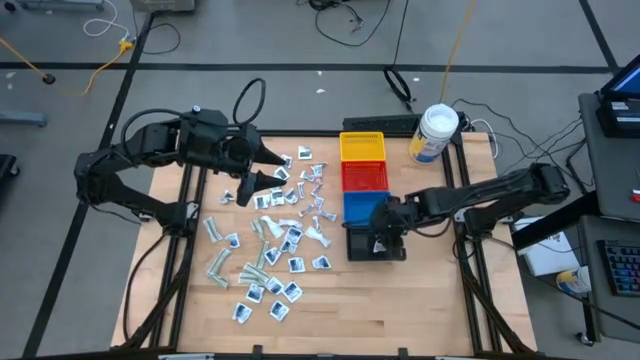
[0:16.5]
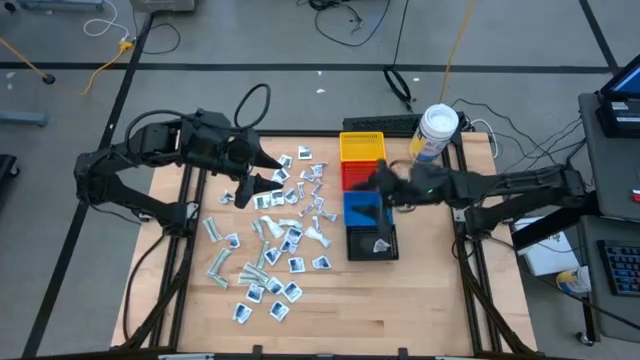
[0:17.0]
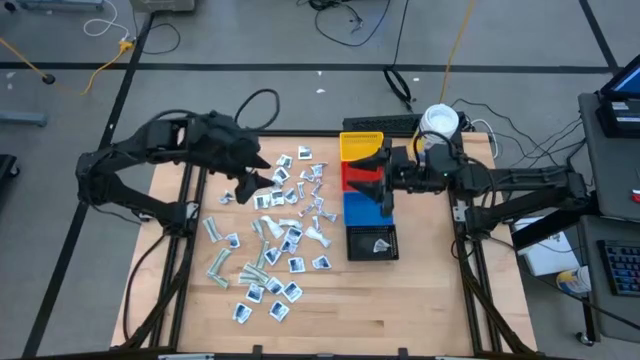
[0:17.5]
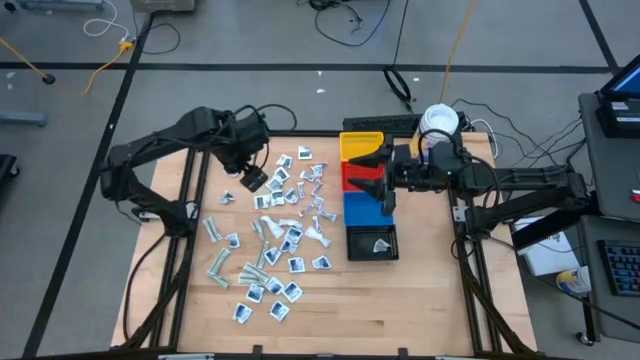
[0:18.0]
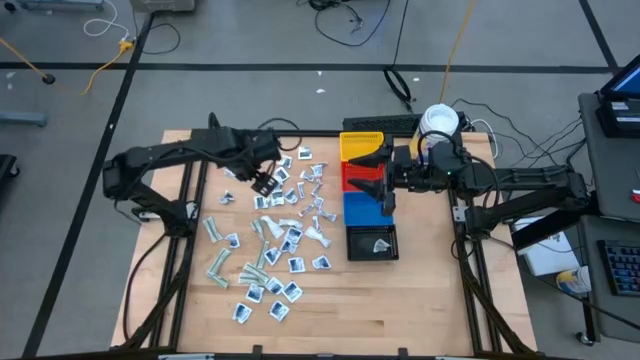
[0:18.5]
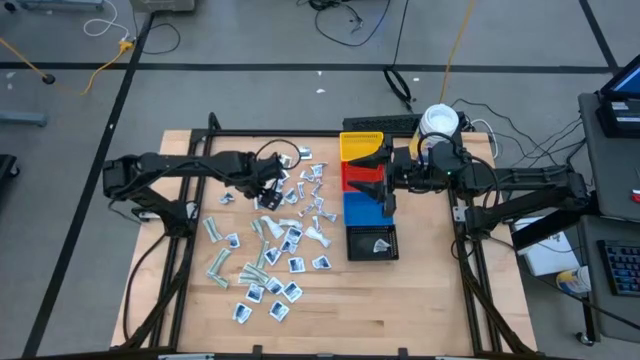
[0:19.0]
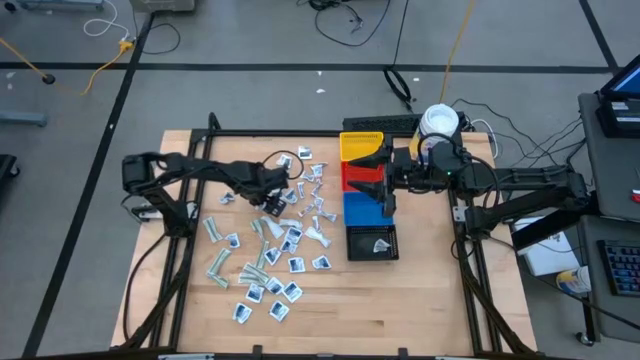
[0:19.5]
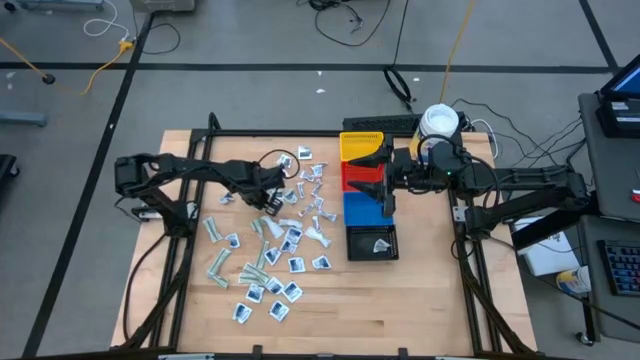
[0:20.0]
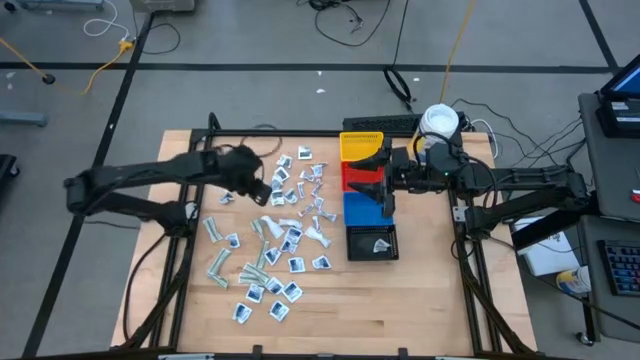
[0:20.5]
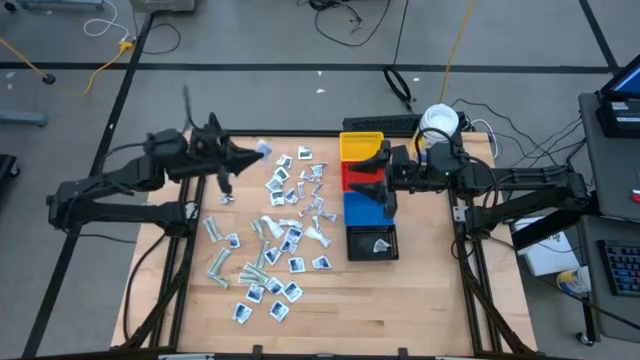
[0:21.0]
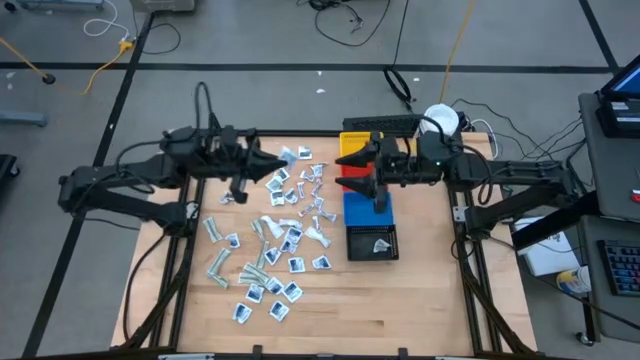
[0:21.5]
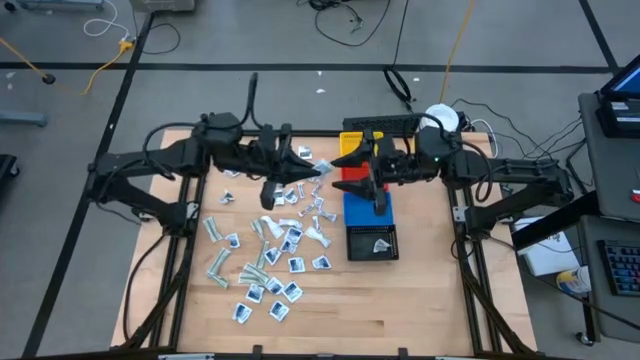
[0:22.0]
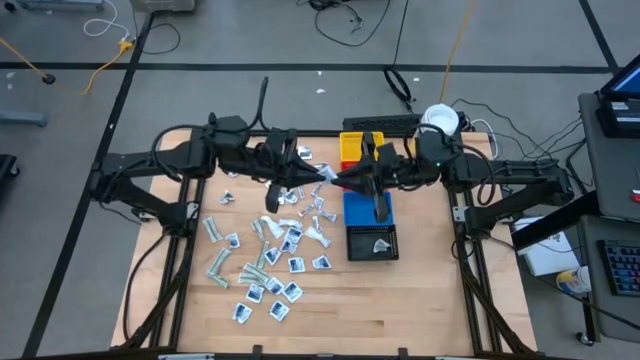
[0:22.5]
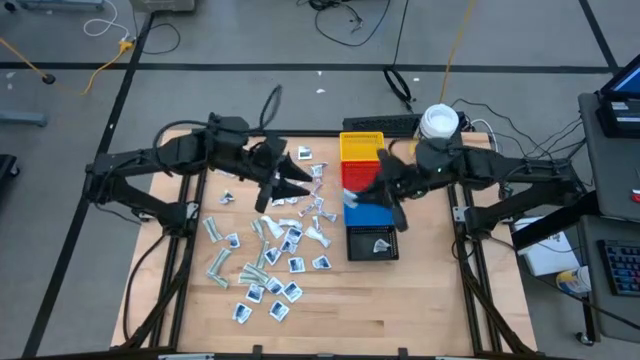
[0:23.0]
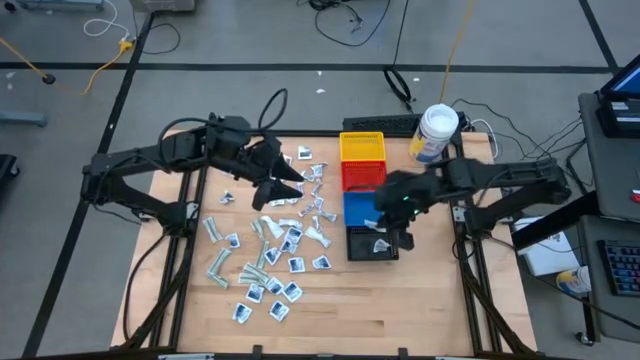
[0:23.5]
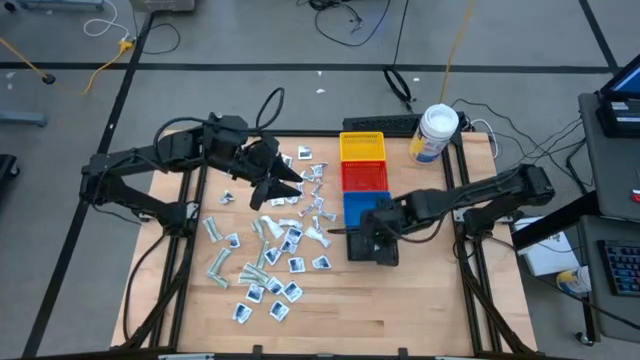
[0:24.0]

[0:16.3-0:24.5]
Task: Pick & Place First Aid Supplies
Put the black towelette pack into the black bin

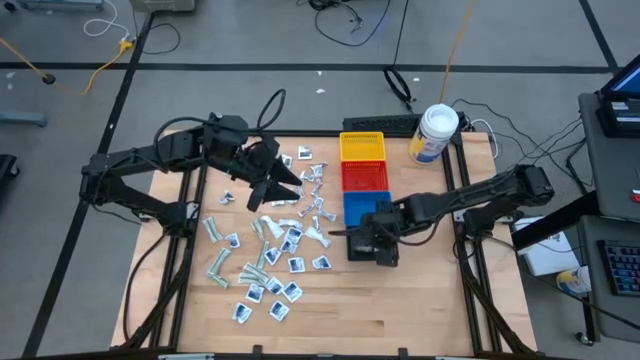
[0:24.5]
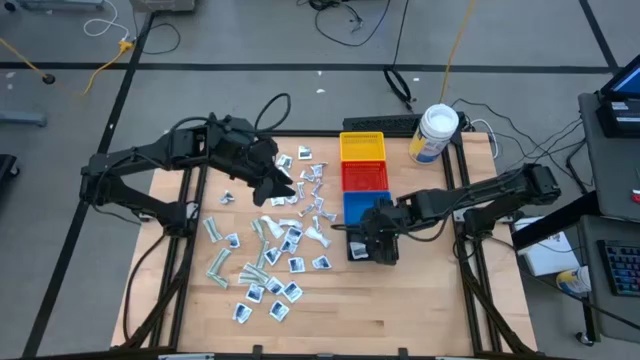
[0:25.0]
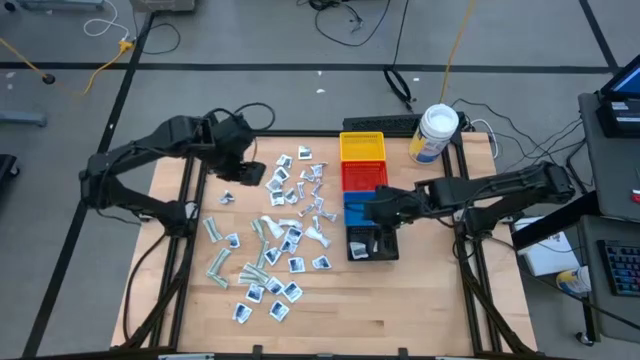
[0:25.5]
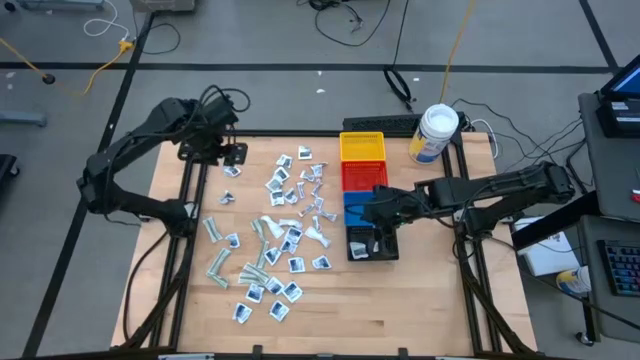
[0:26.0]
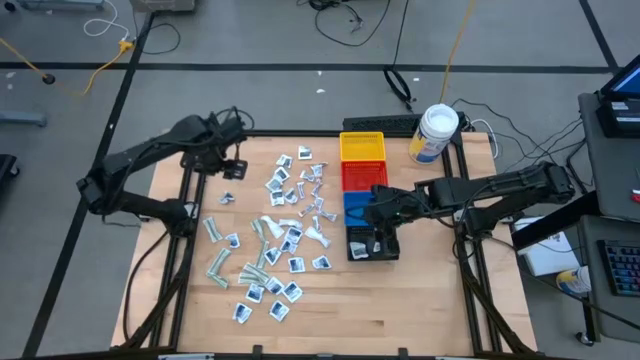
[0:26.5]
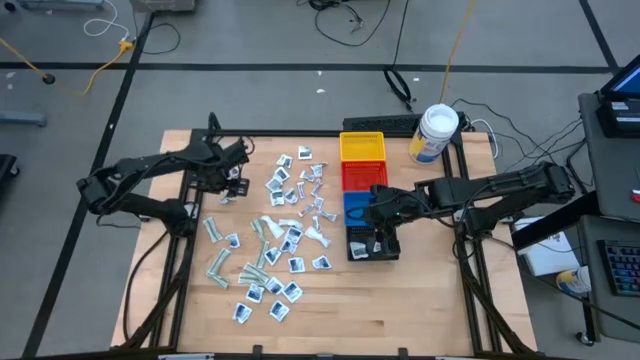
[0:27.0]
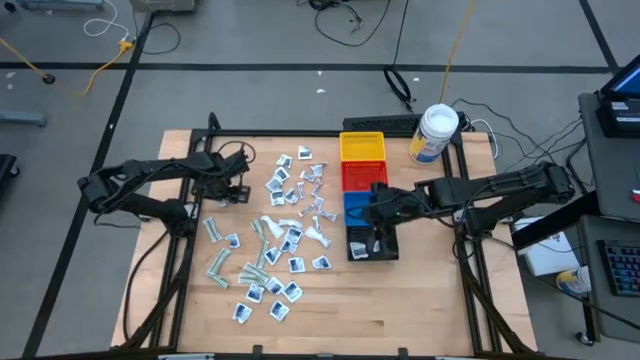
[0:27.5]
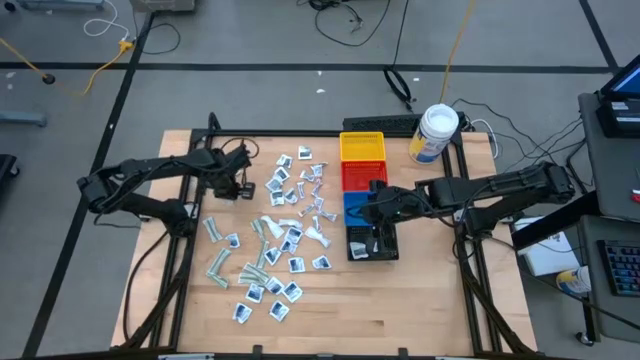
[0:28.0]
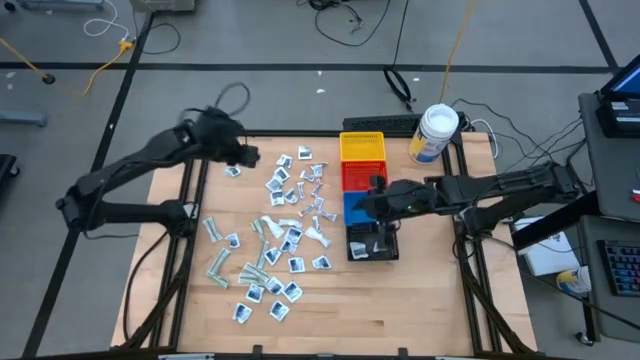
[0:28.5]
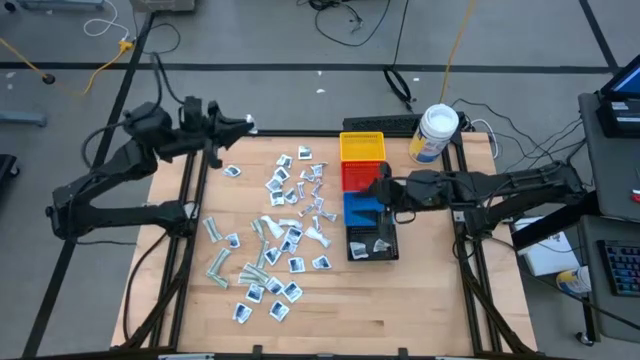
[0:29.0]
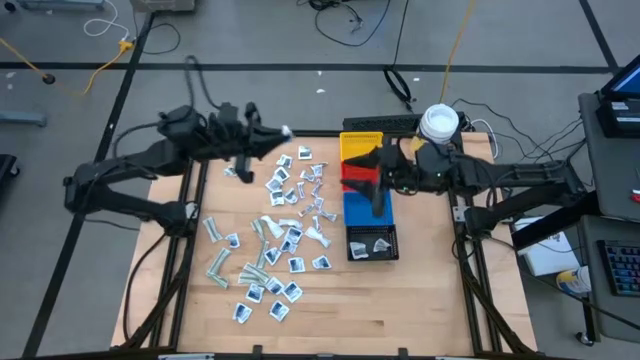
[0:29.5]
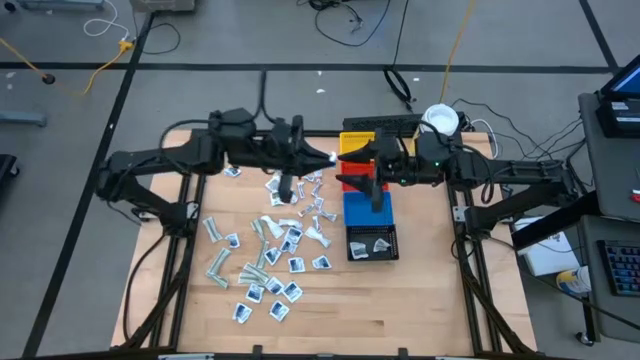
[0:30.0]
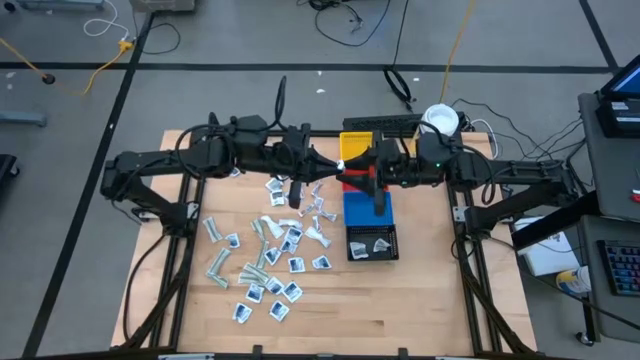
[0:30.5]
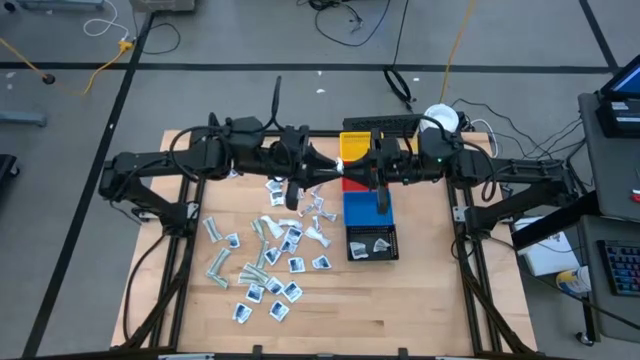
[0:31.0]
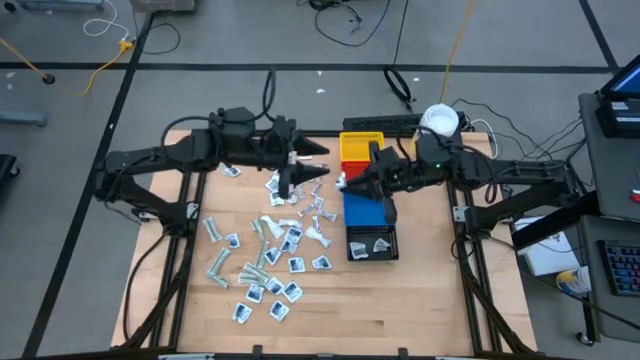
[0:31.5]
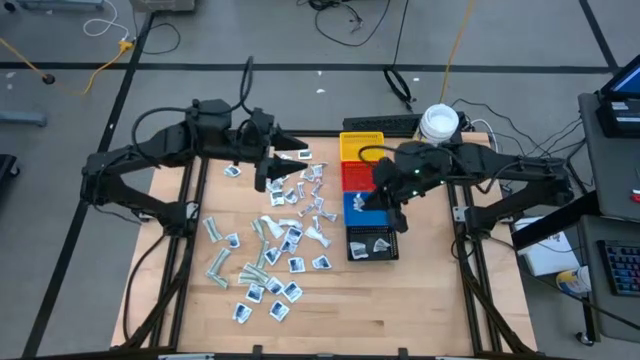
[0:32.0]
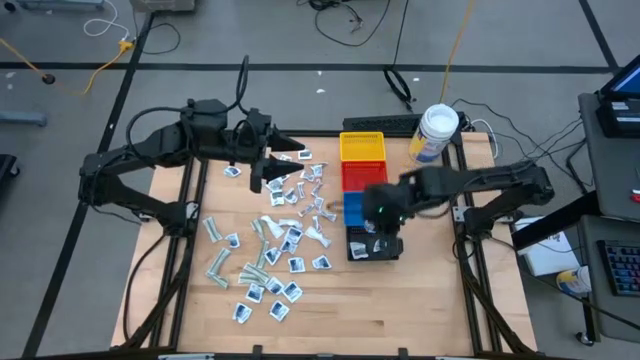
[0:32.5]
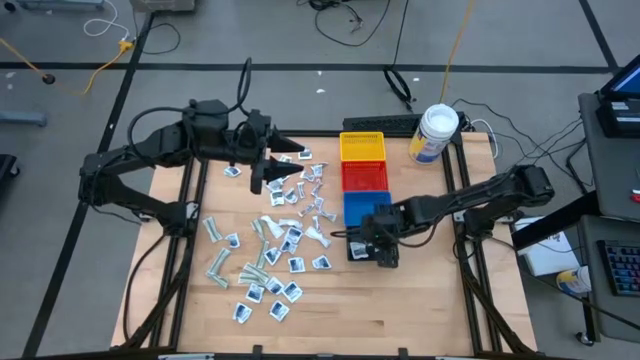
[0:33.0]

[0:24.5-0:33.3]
Put the black towelette pack into the black bin

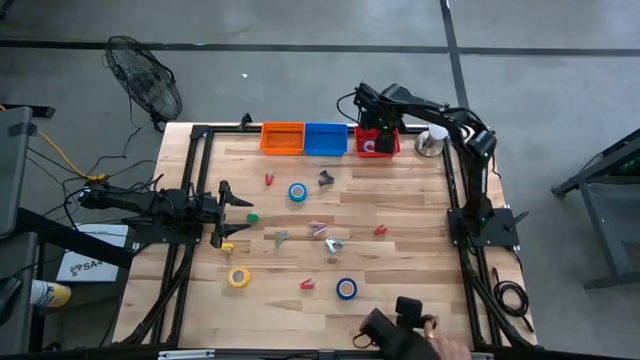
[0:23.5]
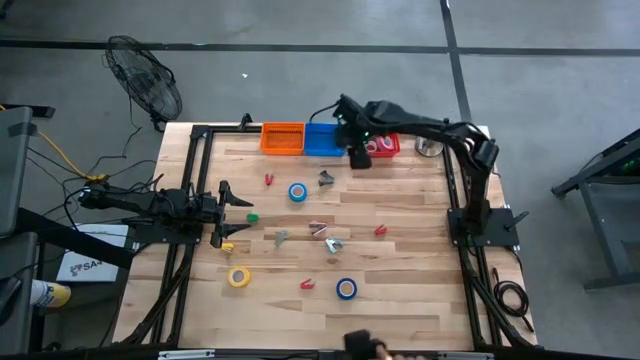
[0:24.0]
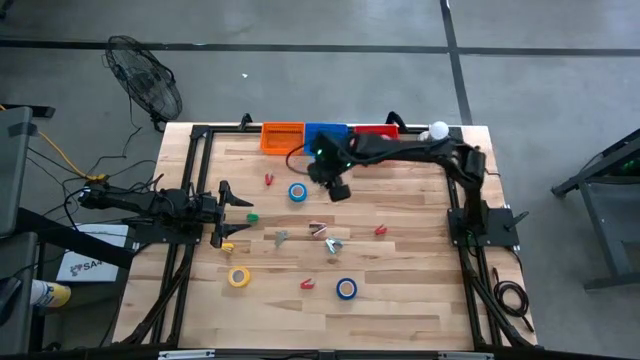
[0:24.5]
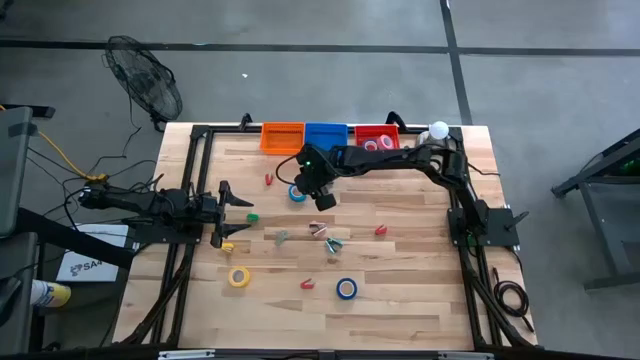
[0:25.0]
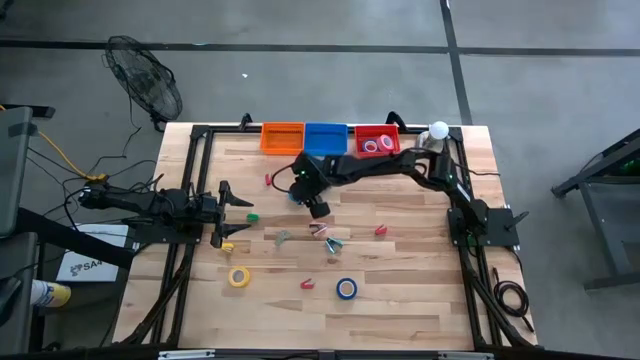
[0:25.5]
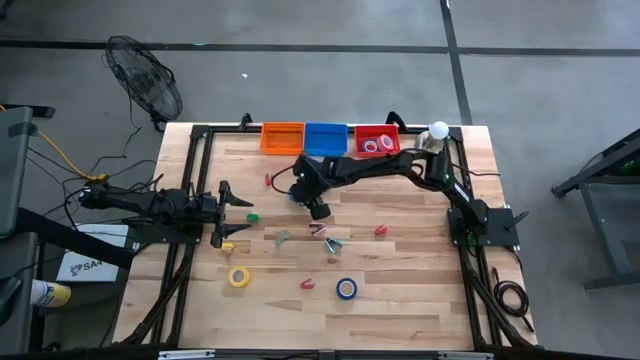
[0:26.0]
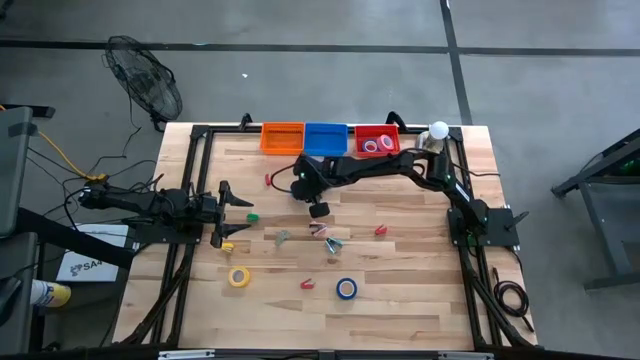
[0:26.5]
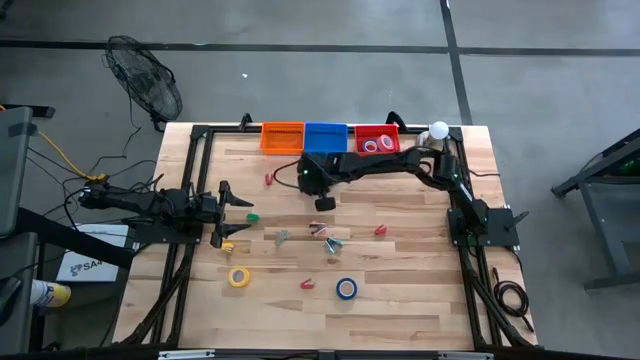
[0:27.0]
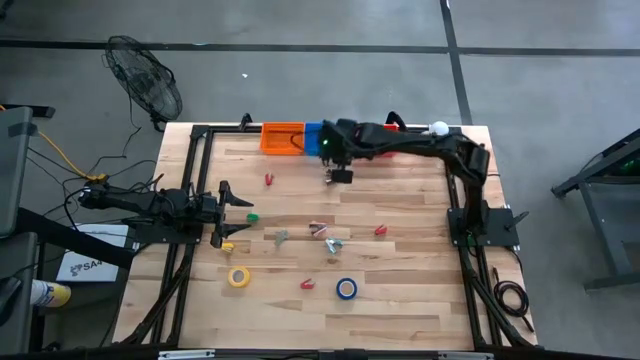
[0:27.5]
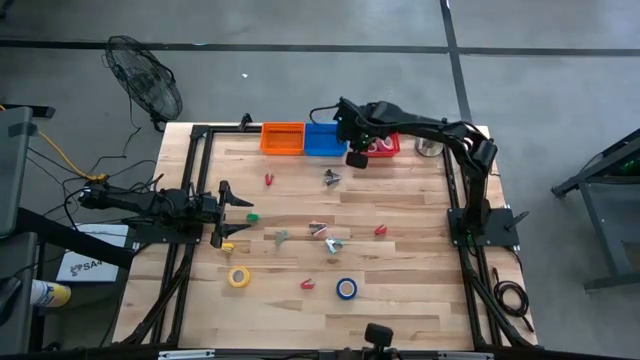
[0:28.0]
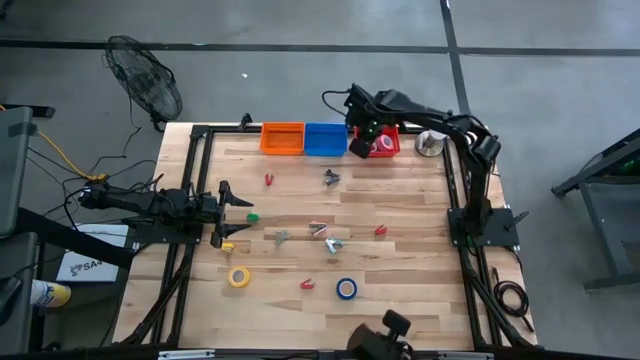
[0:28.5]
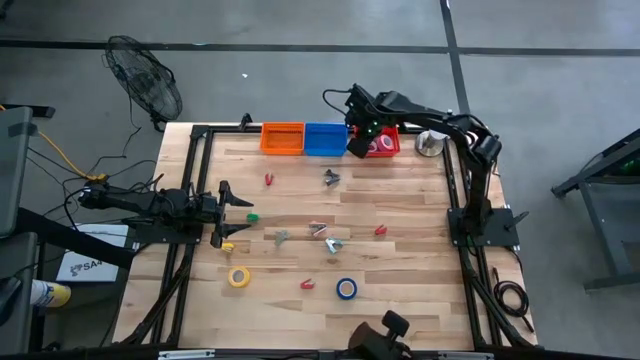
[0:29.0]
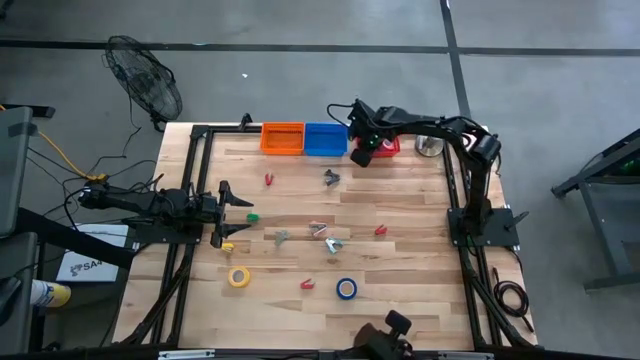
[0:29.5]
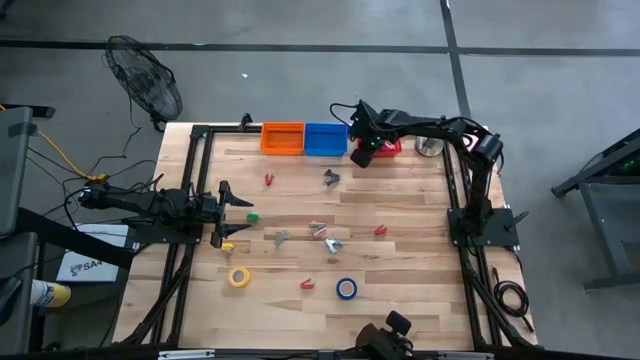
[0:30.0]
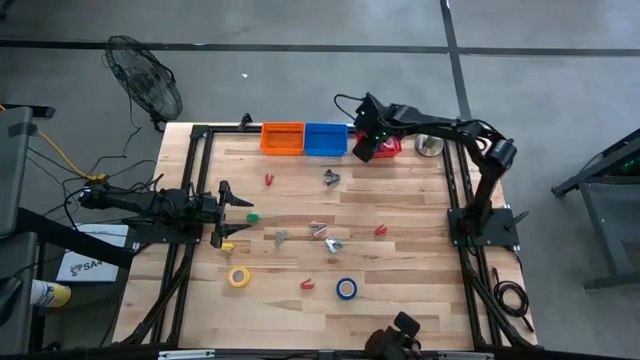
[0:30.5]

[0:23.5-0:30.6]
Task: Pick and place Stapler, Stapler remover, tape
Put the blue tape into the red bin
